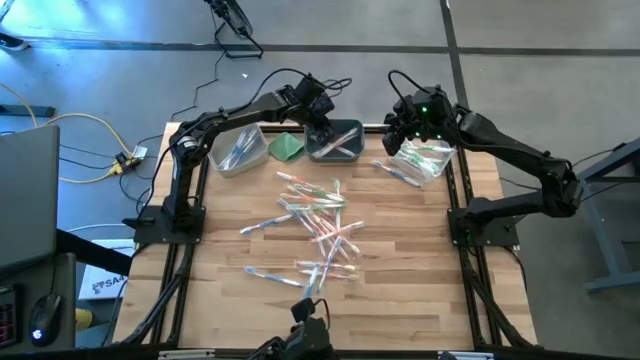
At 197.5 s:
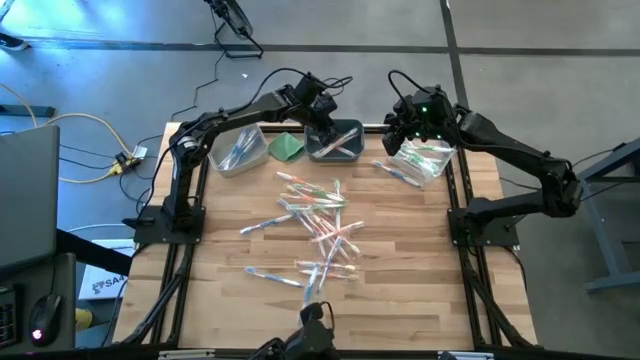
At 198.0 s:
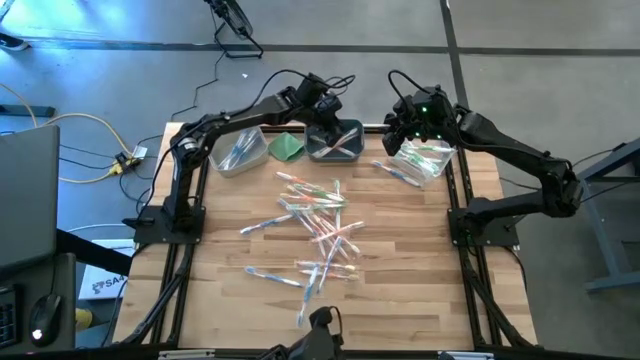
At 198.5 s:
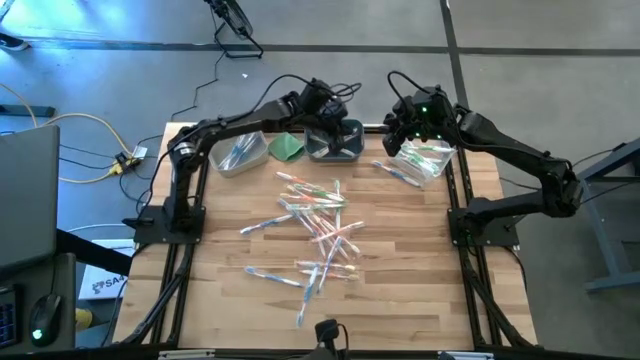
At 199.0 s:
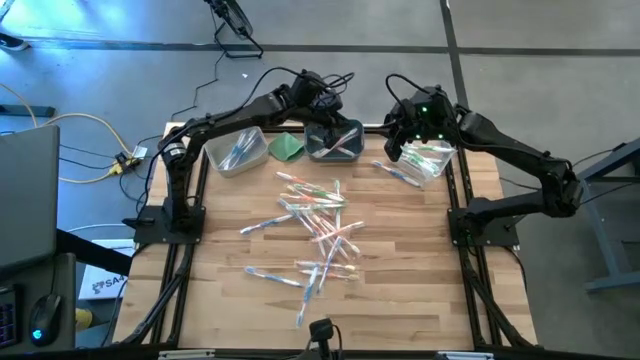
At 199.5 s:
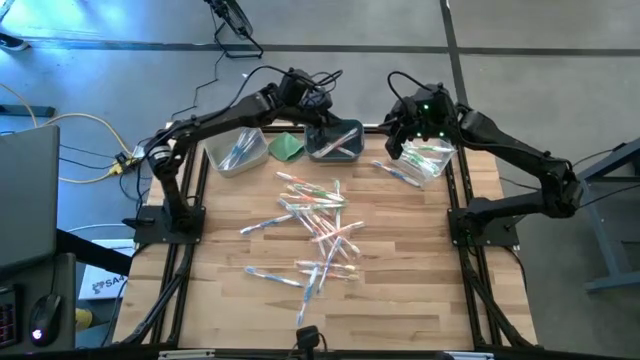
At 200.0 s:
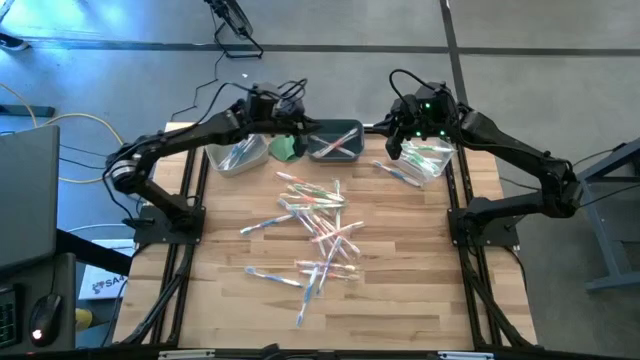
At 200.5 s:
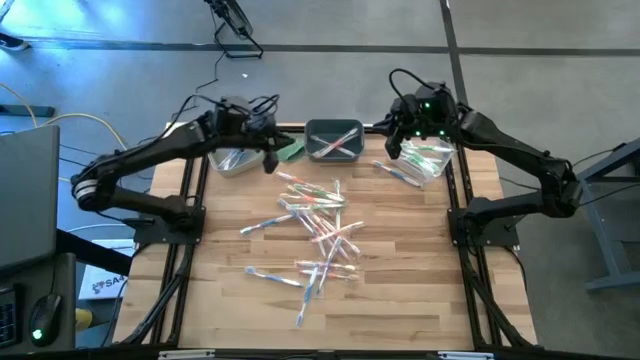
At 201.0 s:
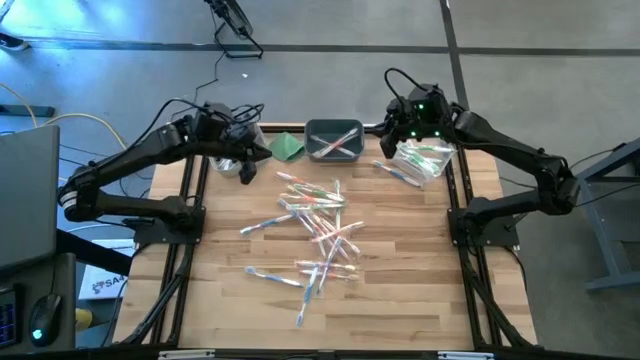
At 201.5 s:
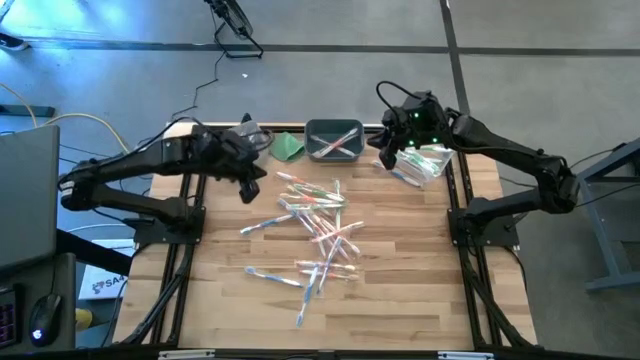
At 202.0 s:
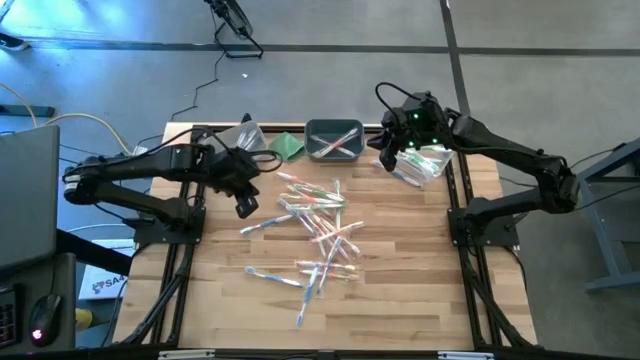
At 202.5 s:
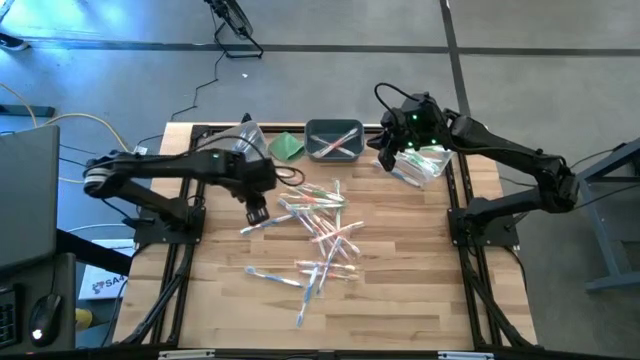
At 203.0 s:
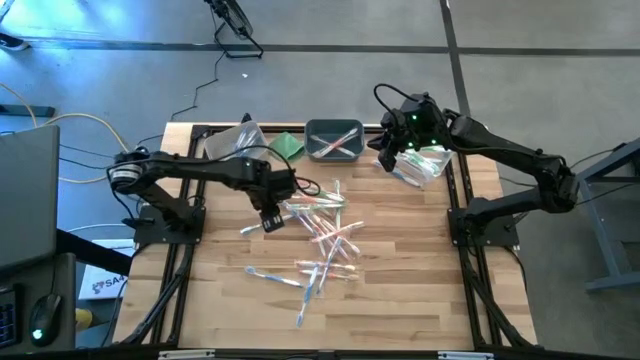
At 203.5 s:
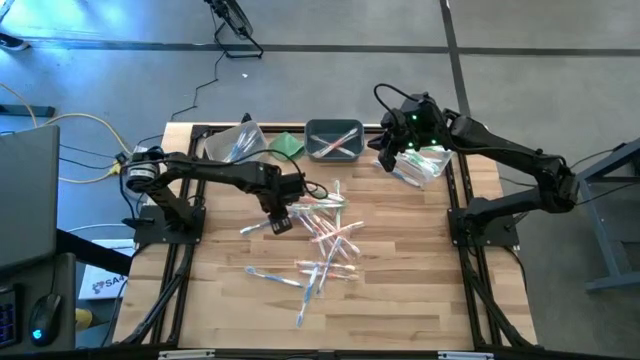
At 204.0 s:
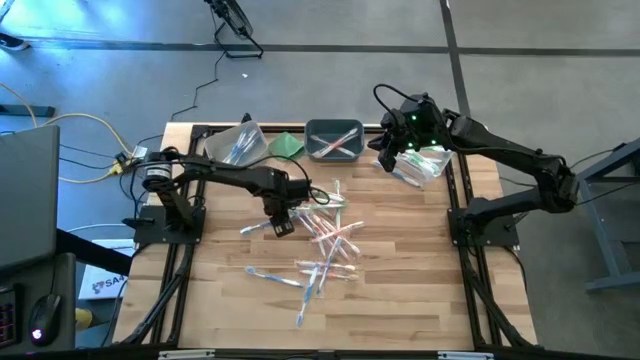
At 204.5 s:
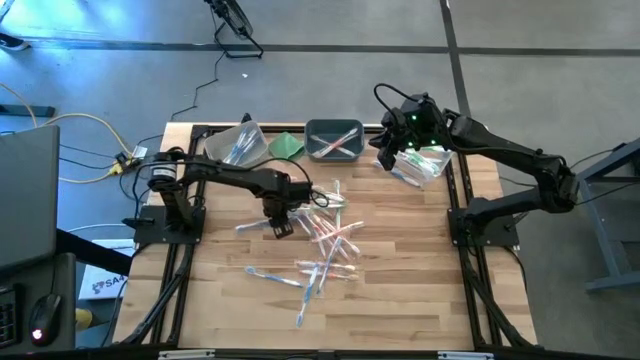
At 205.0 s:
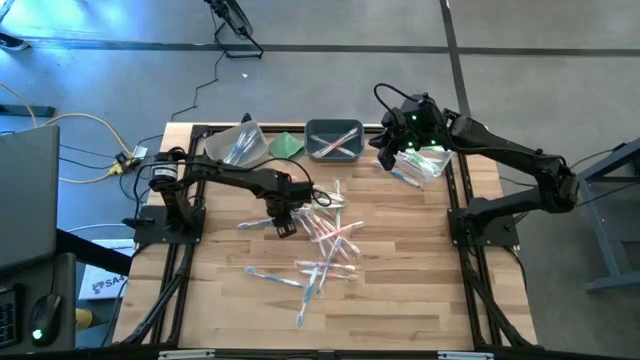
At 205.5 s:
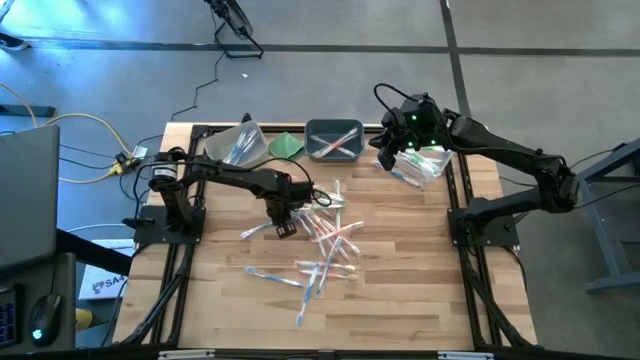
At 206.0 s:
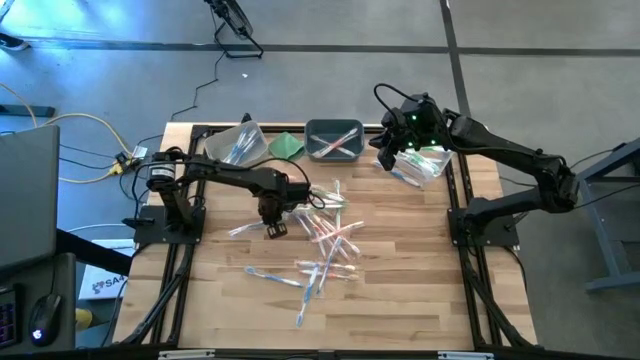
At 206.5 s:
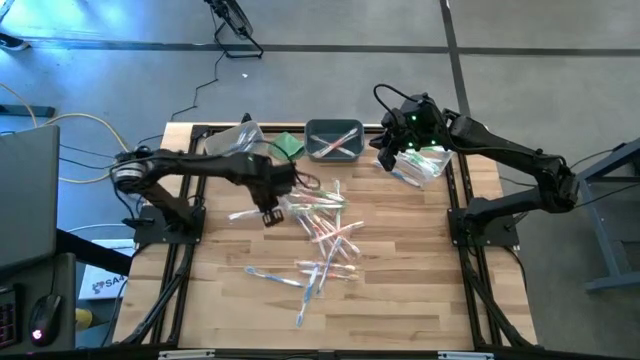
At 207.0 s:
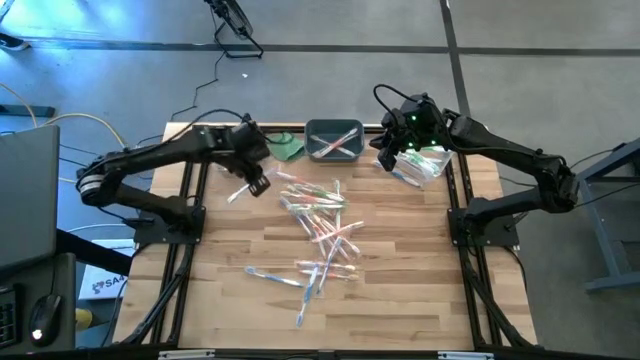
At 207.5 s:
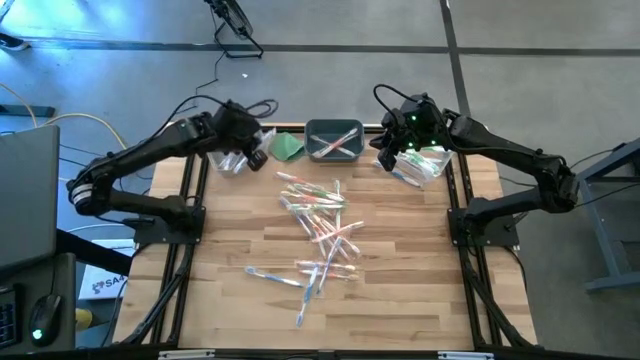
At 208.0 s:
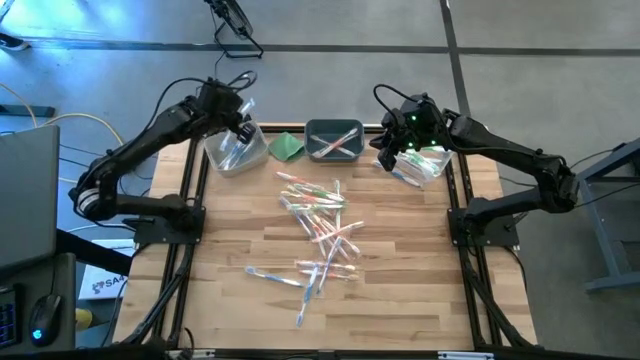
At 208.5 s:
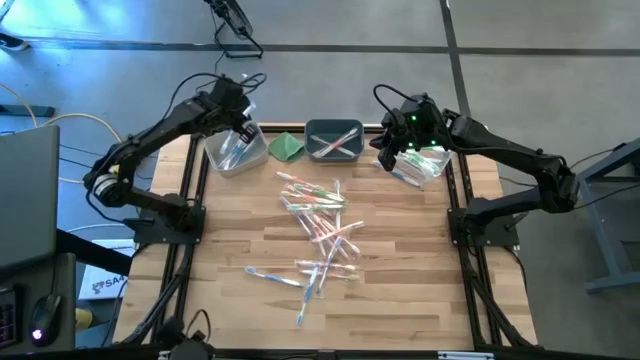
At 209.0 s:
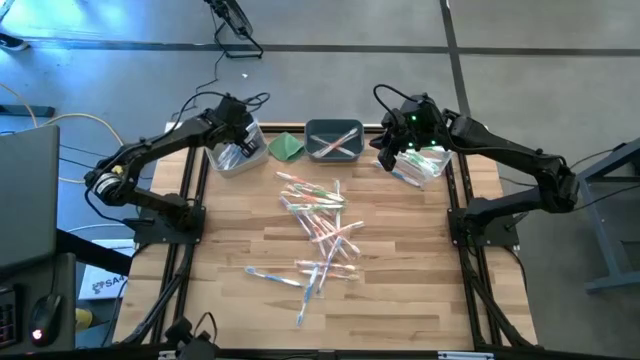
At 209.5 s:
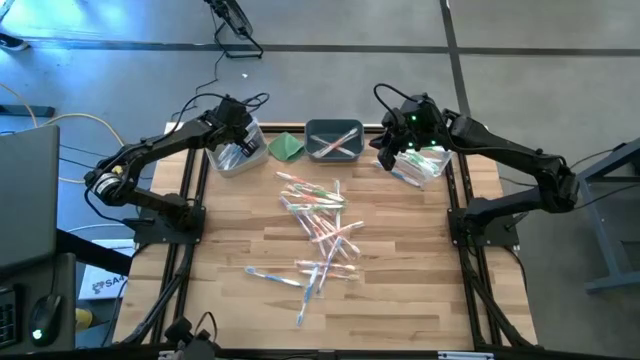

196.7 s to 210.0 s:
Task: Pick & Place Toothbrushes
Put the blue toothbrush into the gray bin

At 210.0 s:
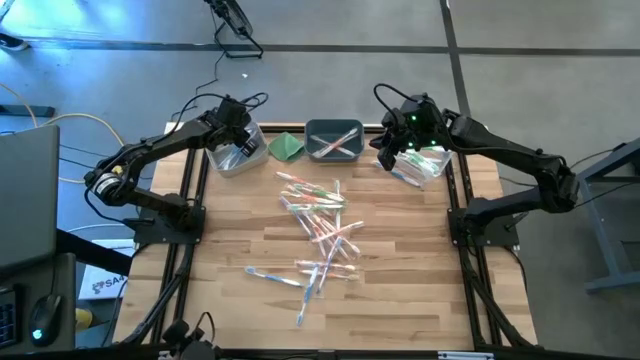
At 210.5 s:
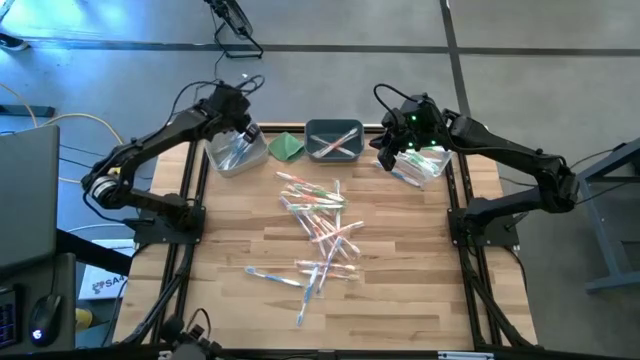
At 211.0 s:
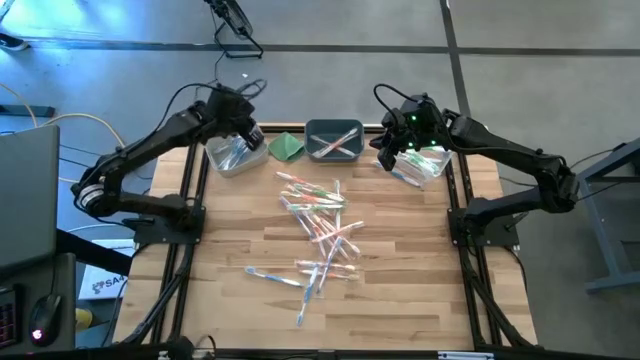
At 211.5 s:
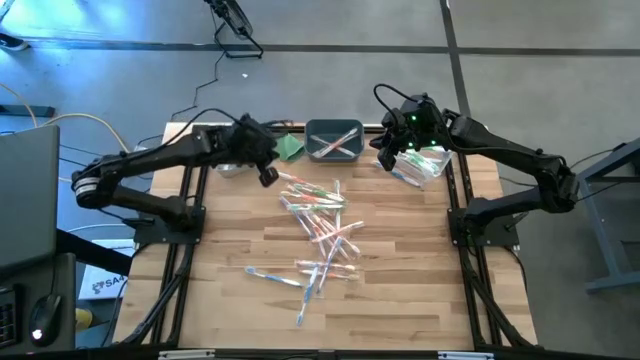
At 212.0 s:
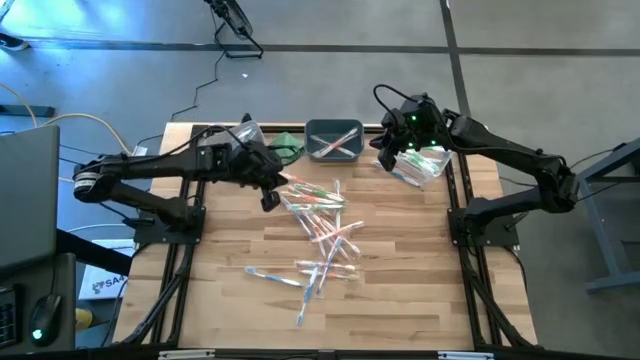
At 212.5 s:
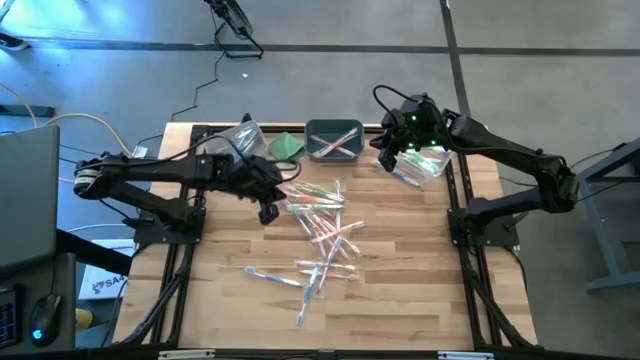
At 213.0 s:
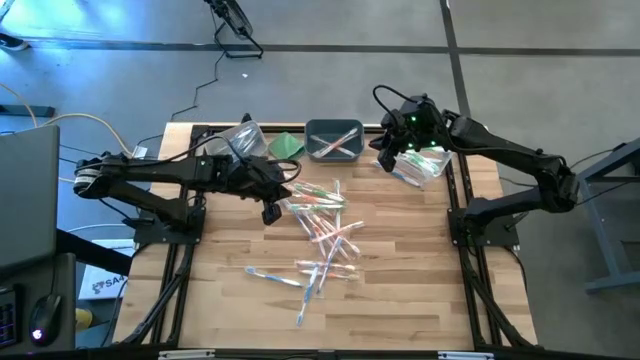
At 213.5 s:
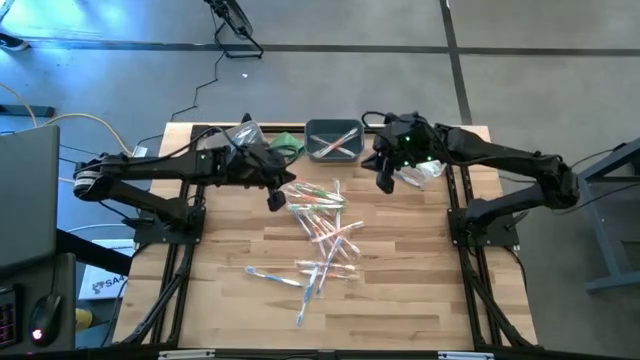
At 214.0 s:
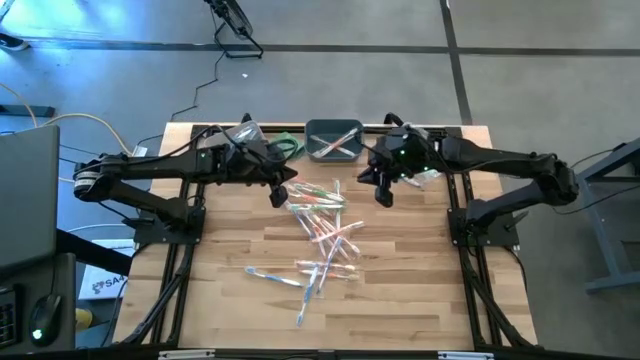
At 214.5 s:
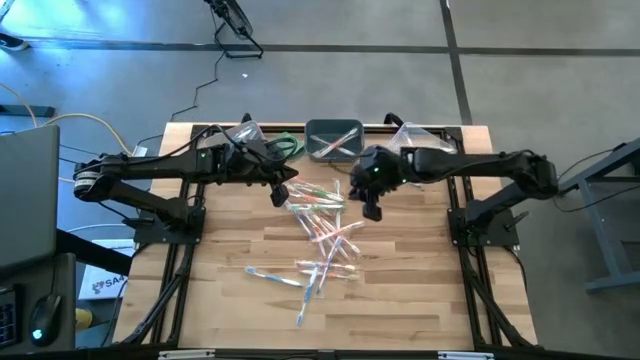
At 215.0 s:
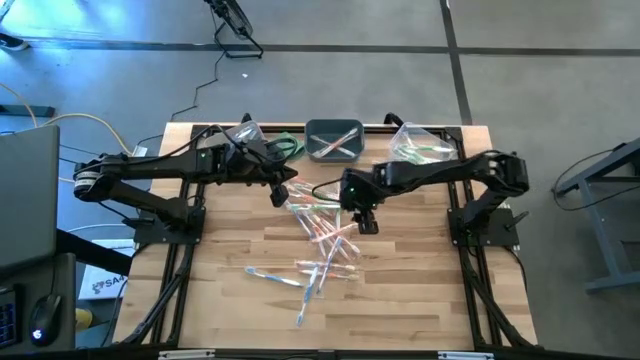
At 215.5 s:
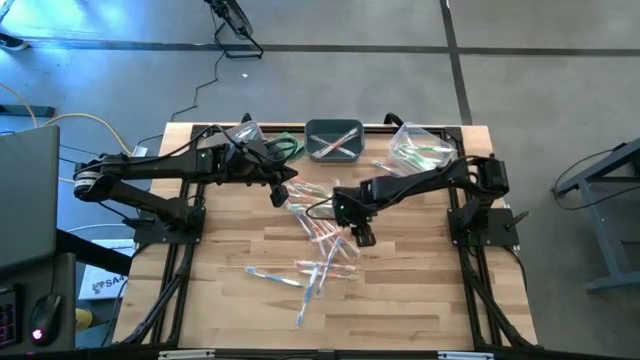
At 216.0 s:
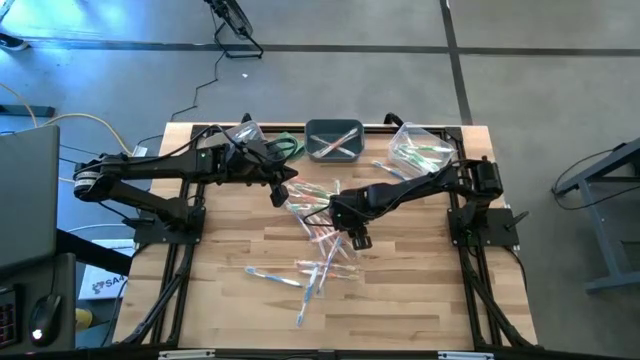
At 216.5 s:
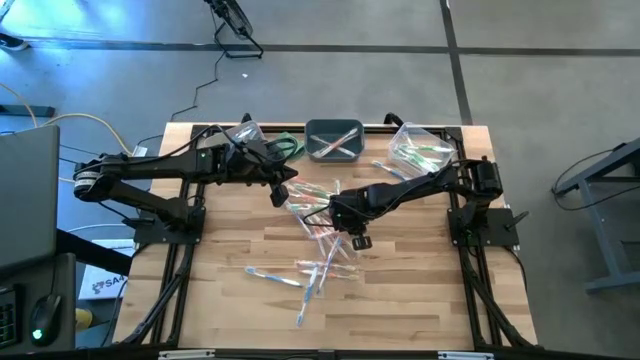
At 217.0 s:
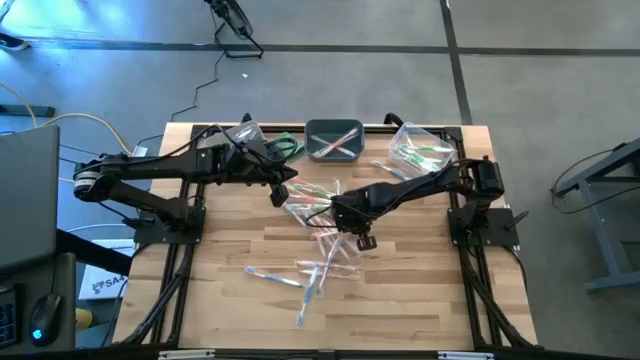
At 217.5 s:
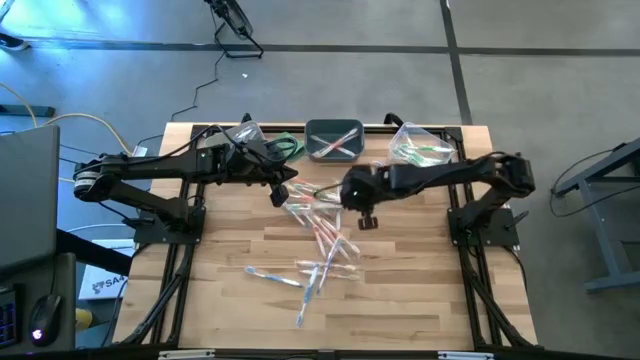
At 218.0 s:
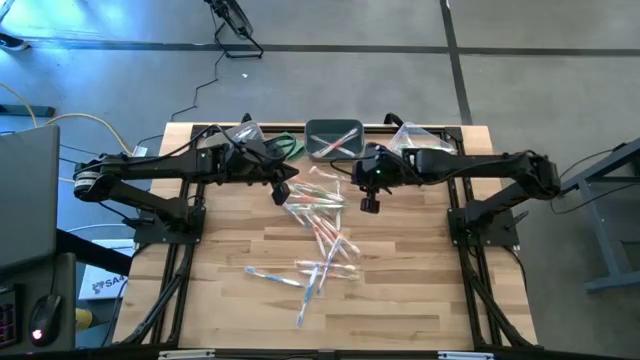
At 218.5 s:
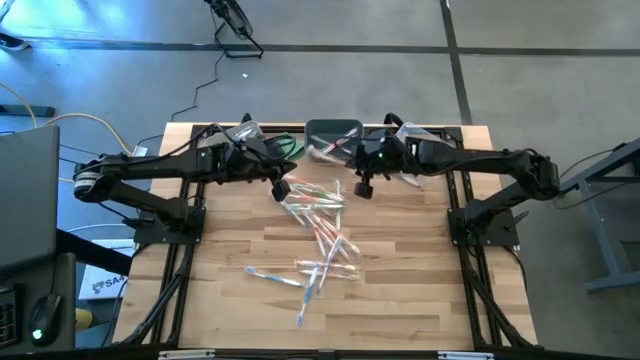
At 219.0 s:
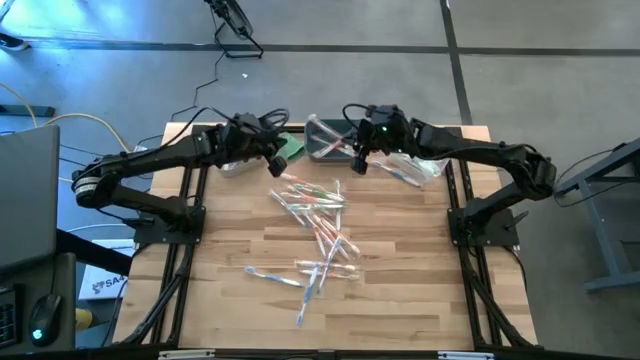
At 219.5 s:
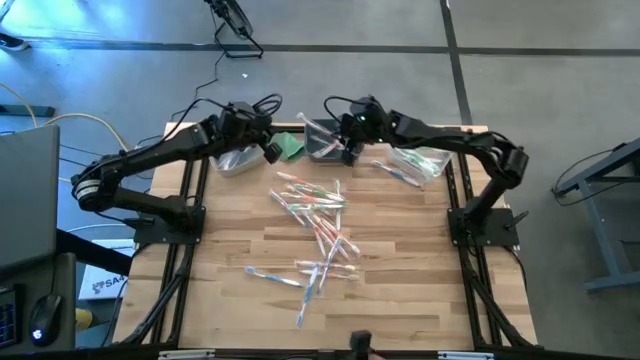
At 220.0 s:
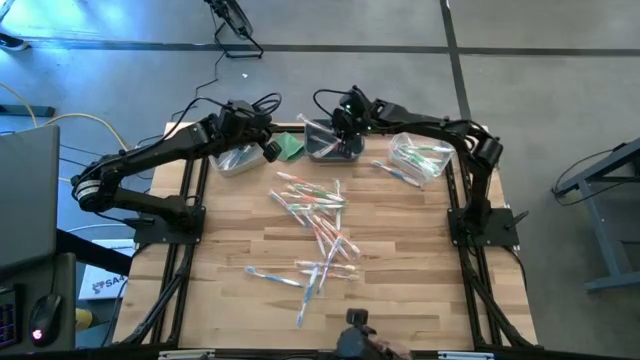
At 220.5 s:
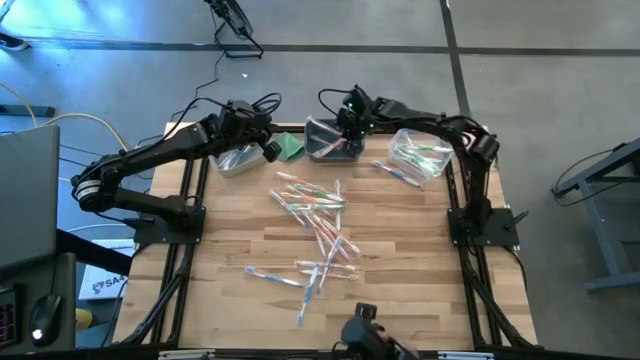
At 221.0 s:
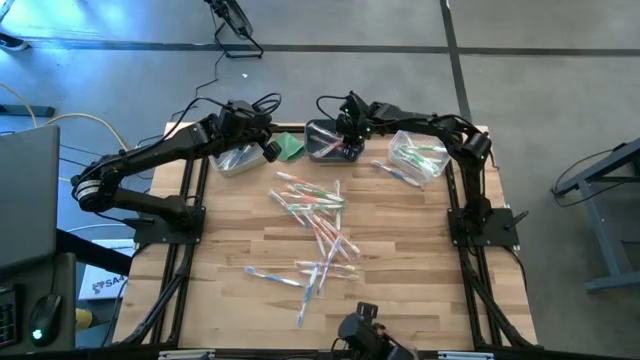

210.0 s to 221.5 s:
Put the orange toothbrush into the blue bin
